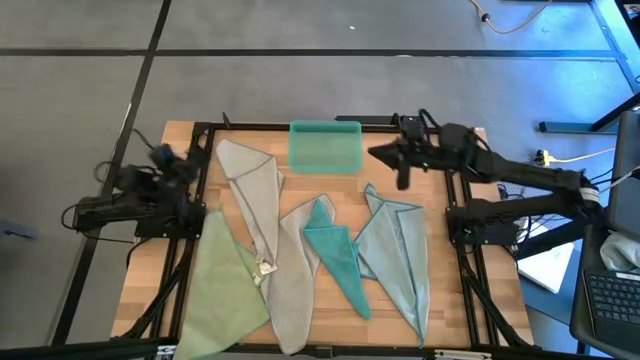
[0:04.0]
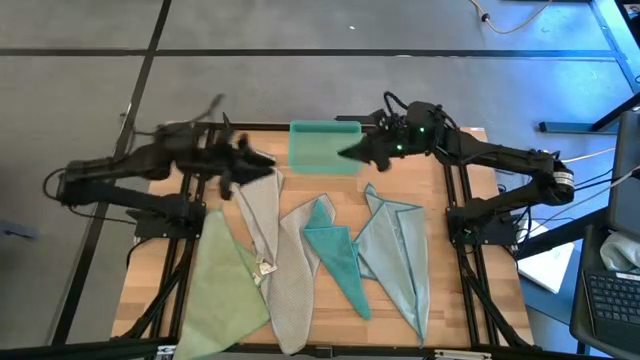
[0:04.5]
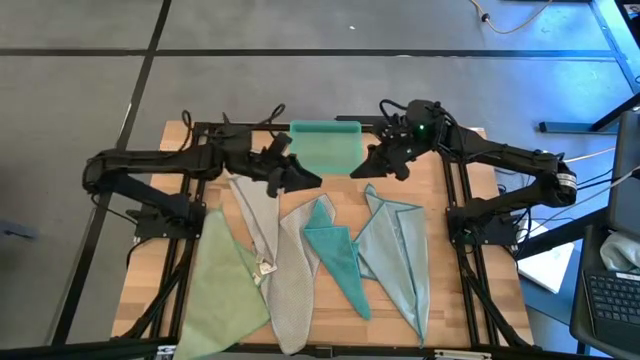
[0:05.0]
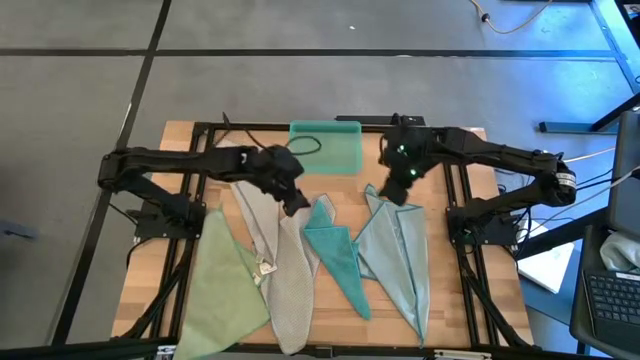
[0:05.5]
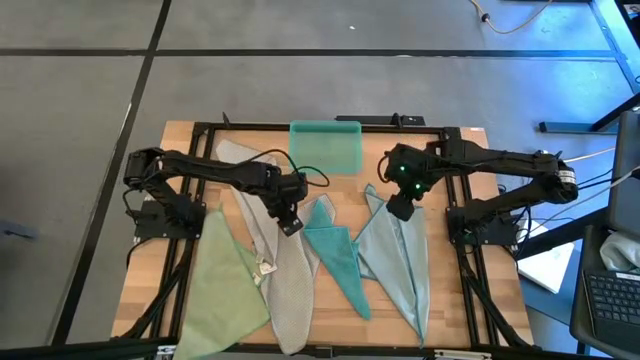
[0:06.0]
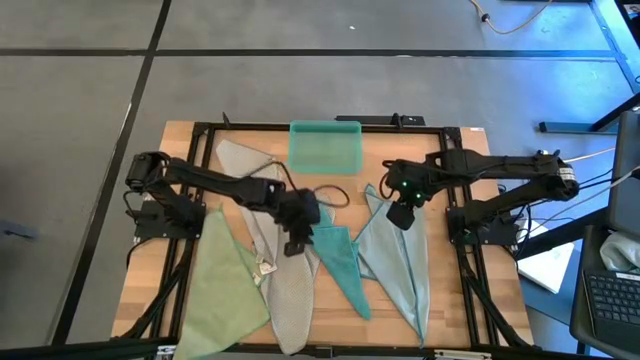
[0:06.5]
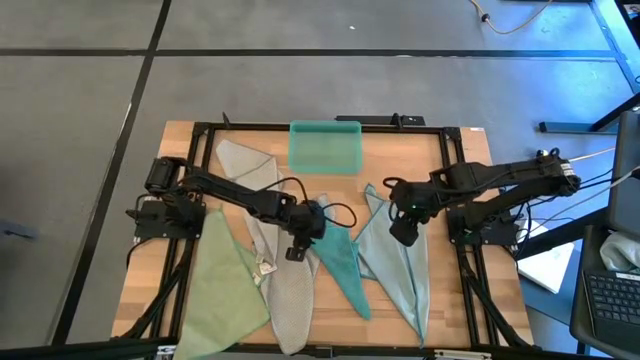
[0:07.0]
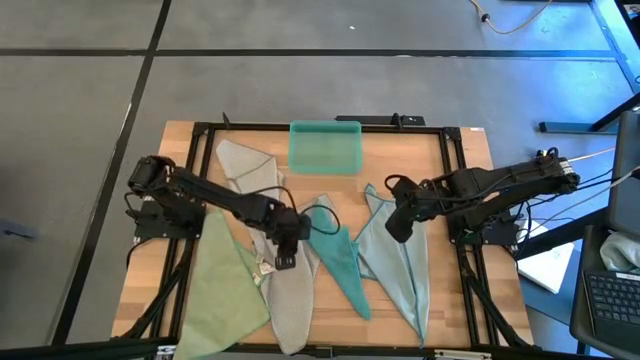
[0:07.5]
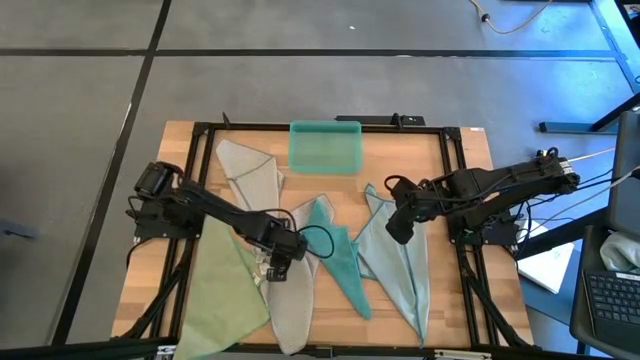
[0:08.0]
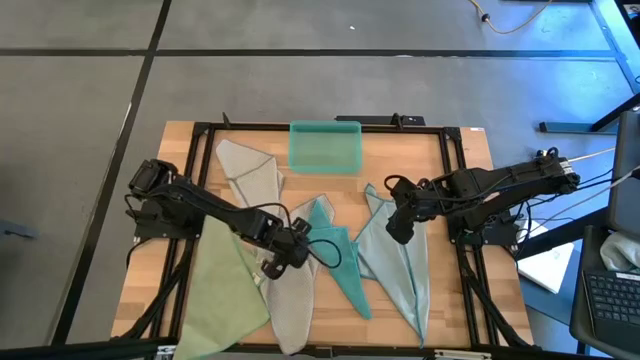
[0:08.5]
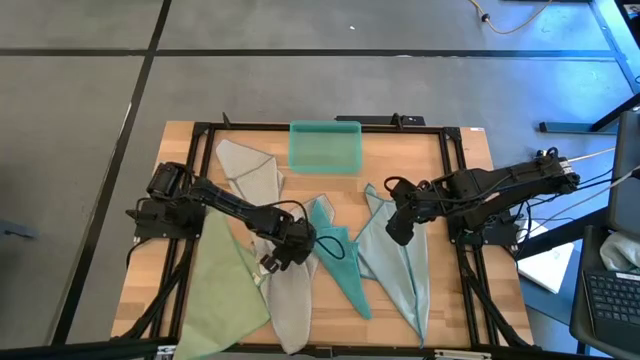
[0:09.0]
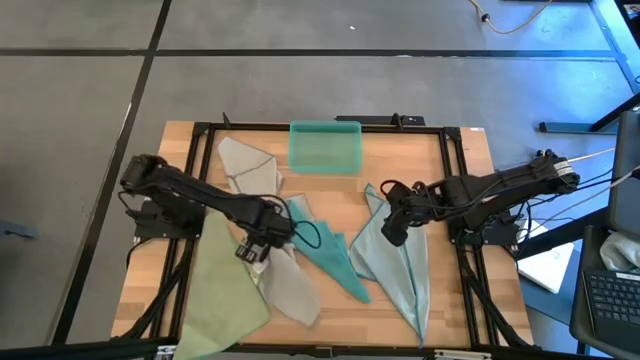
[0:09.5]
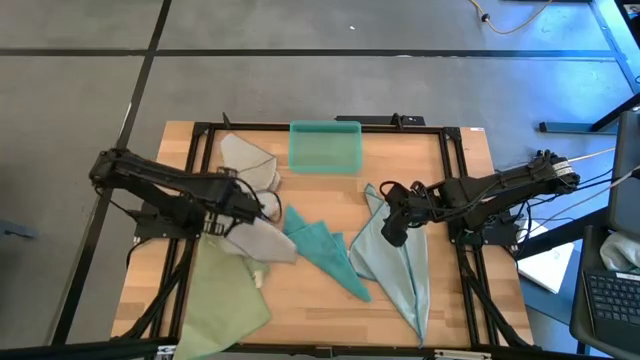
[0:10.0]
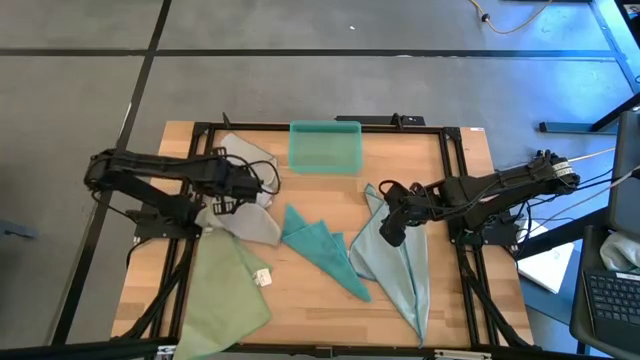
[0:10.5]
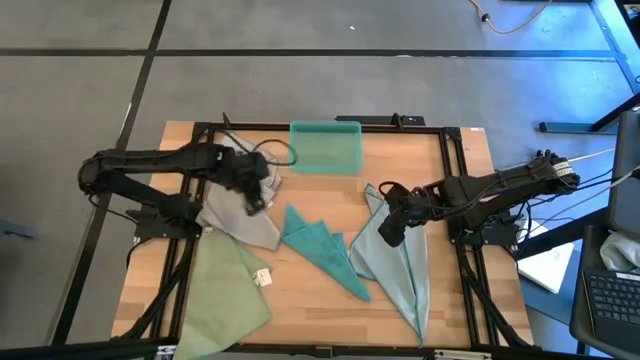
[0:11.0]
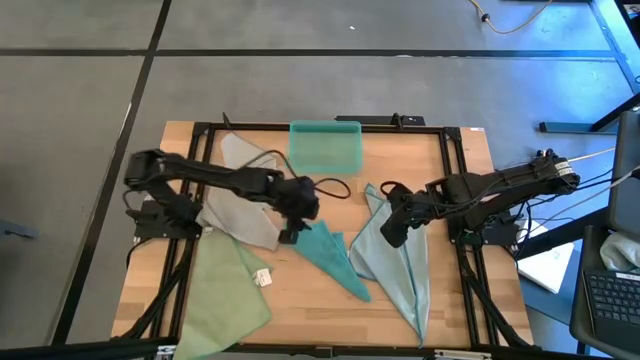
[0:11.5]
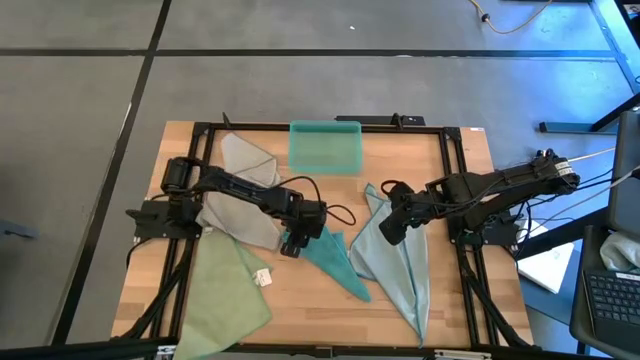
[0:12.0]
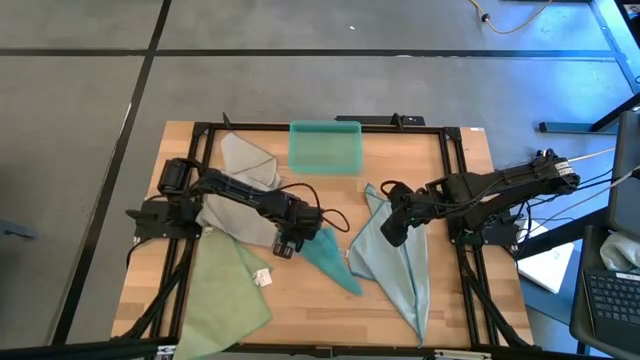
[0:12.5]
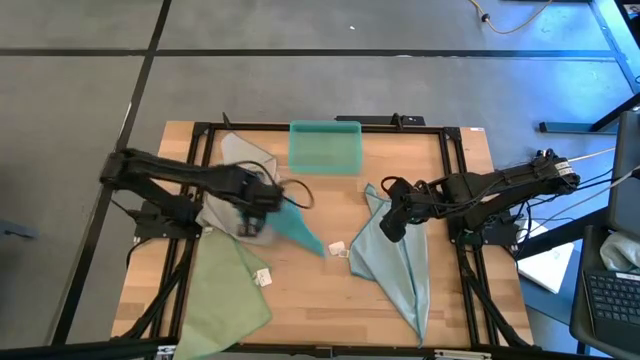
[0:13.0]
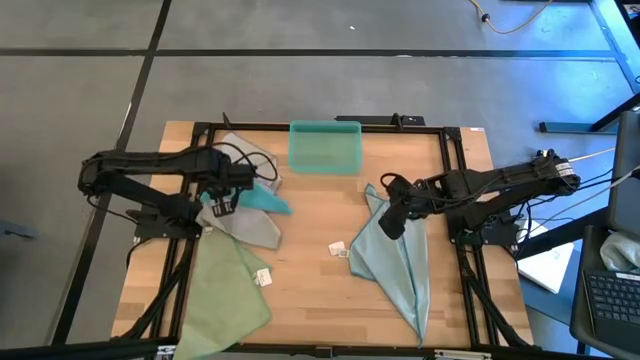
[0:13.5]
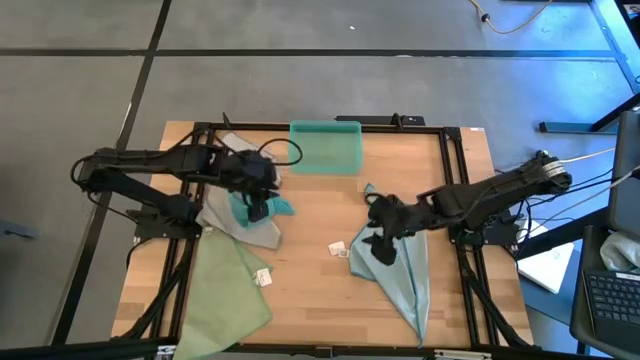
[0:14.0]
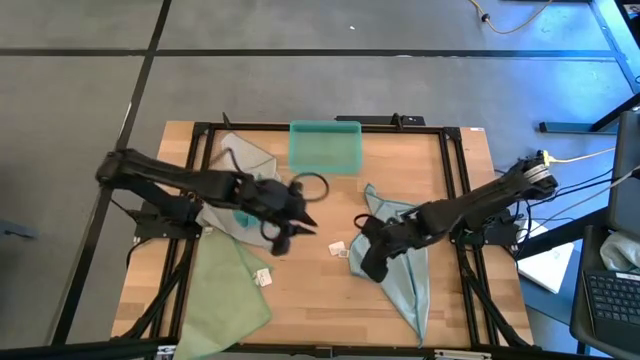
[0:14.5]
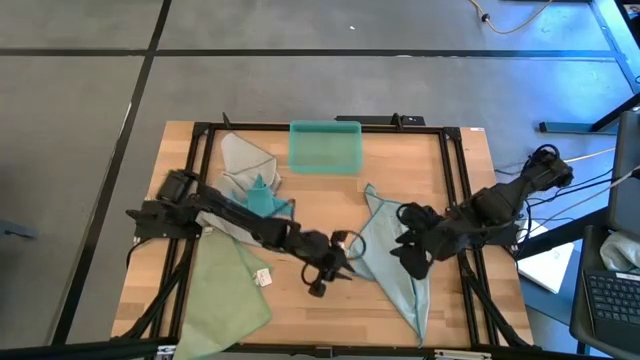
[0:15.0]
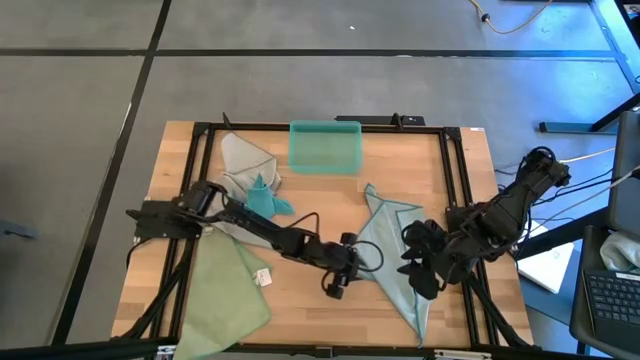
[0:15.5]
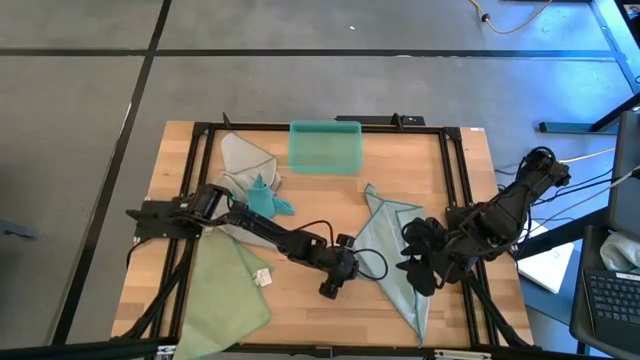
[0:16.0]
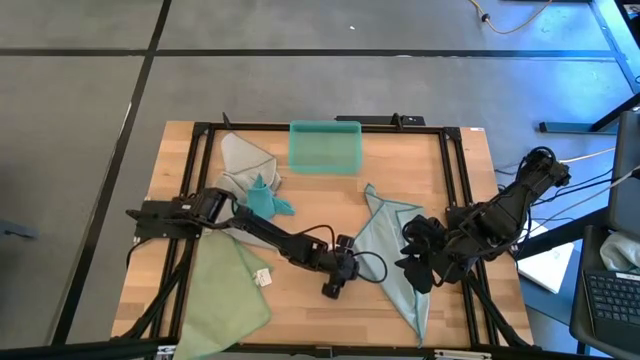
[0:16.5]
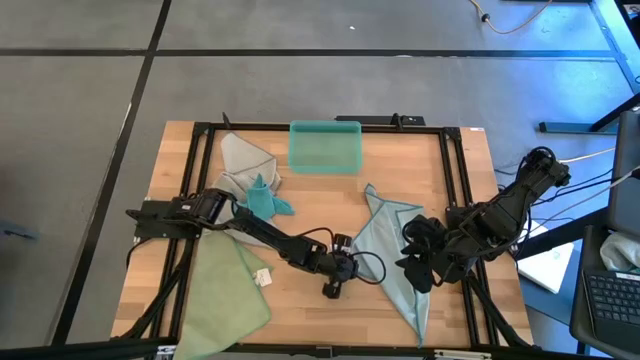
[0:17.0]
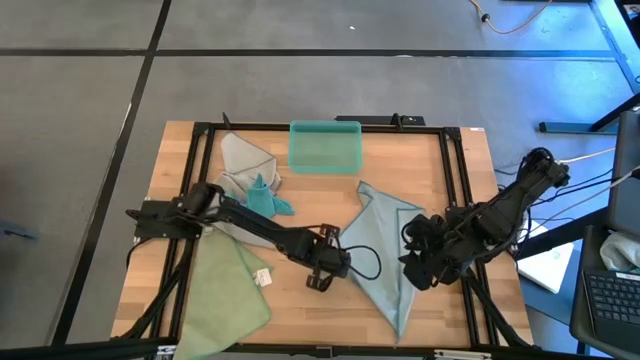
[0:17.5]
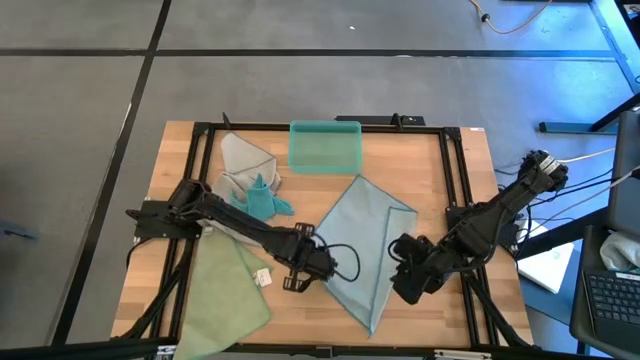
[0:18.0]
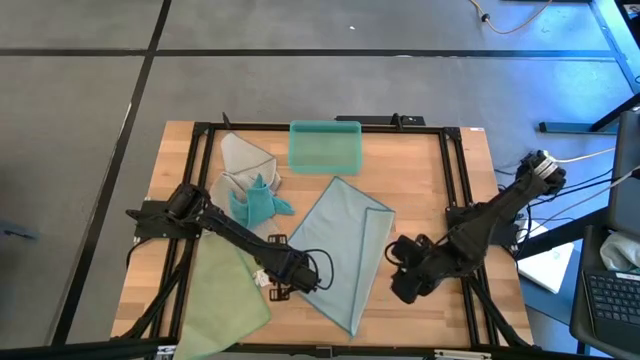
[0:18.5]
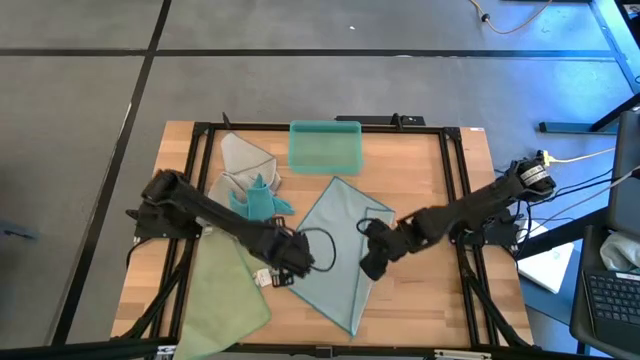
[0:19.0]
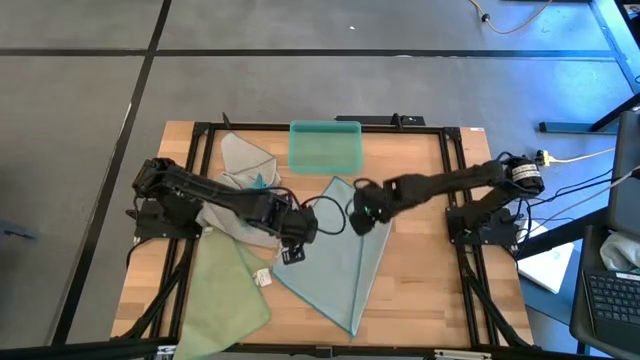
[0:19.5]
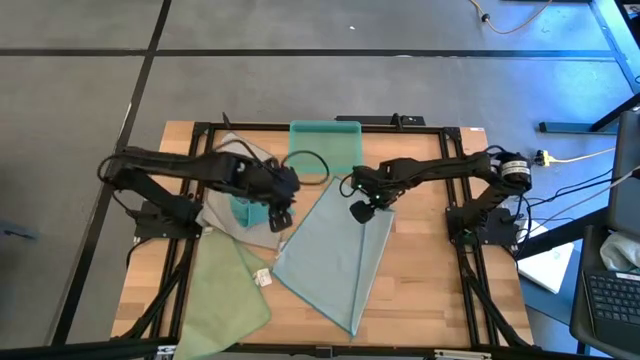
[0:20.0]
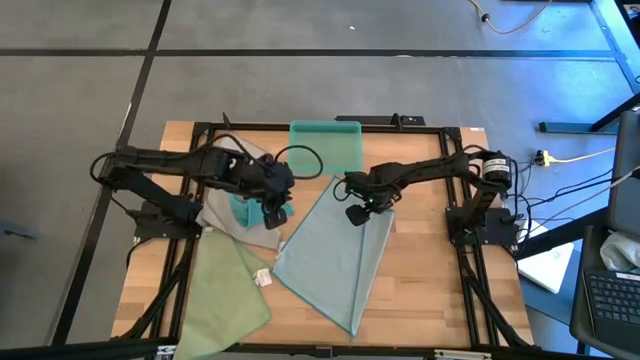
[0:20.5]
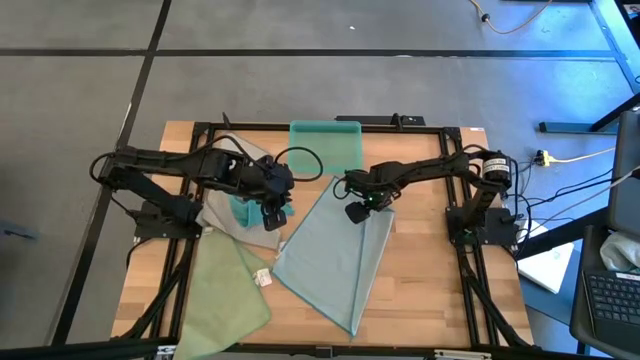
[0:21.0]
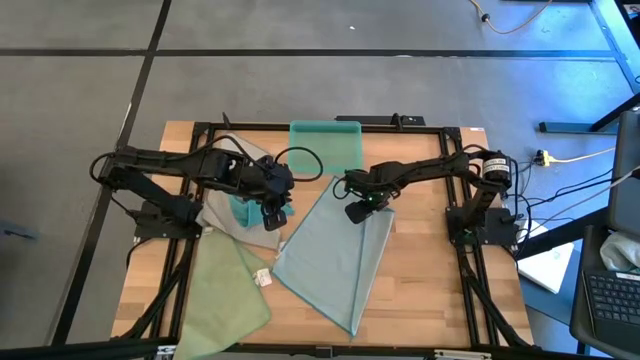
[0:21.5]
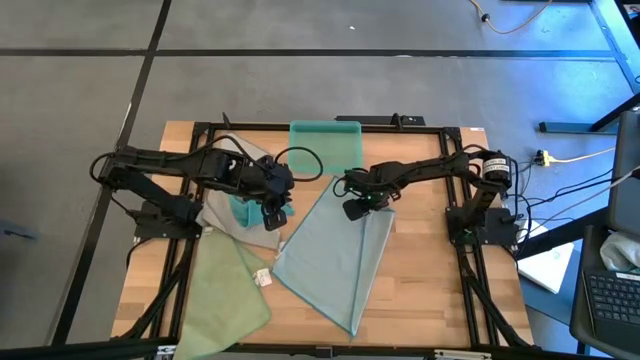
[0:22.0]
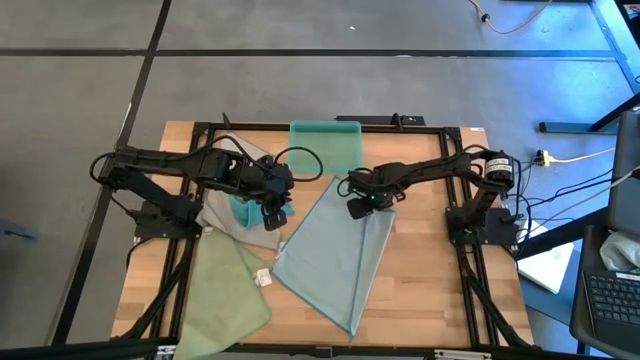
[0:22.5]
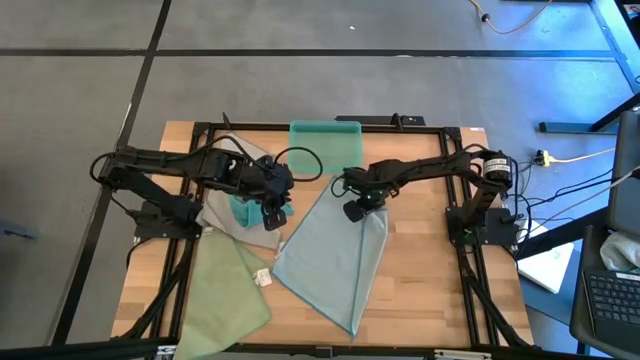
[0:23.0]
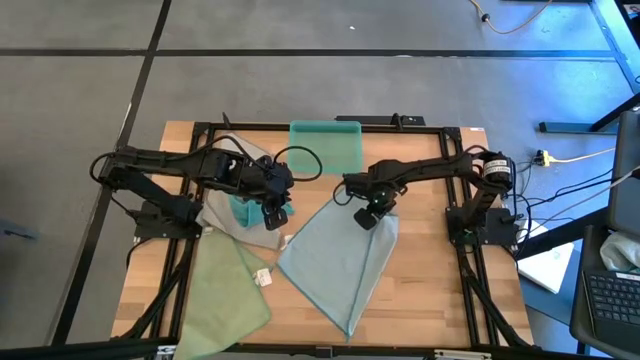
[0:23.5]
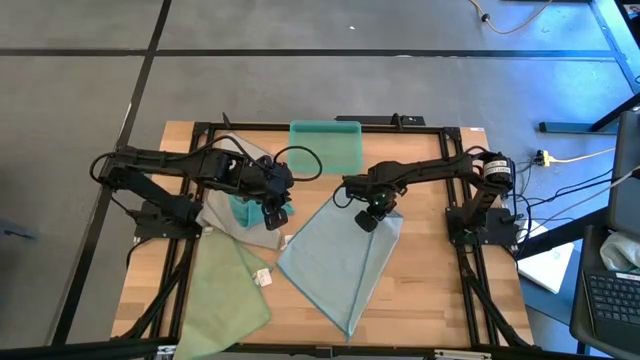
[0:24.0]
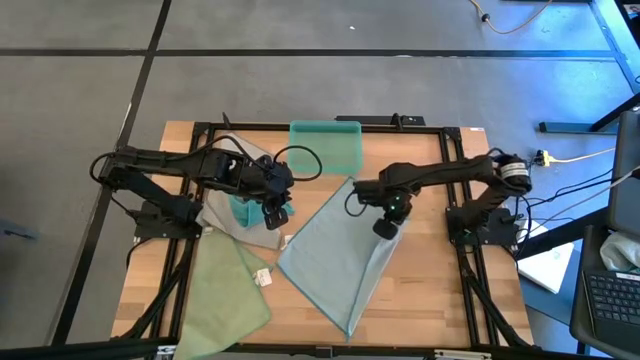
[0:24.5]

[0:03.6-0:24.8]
Task: Fold microfiber towels
Fold the light blue towel
